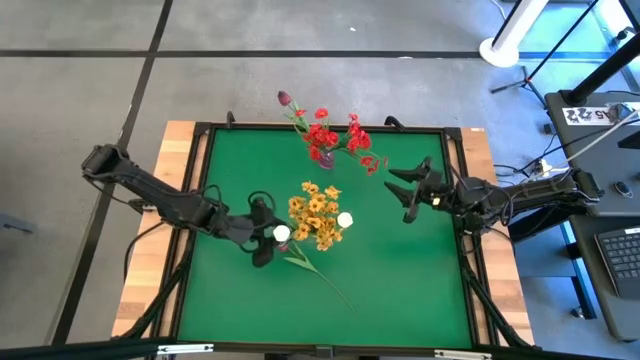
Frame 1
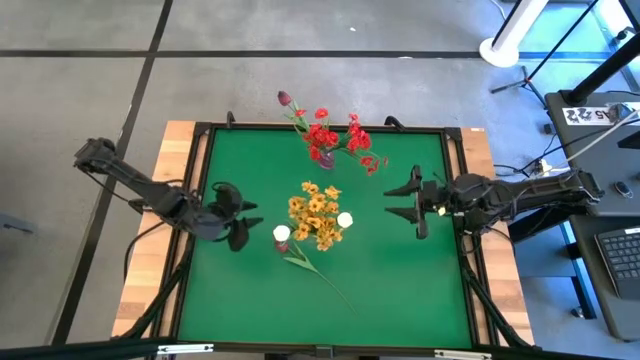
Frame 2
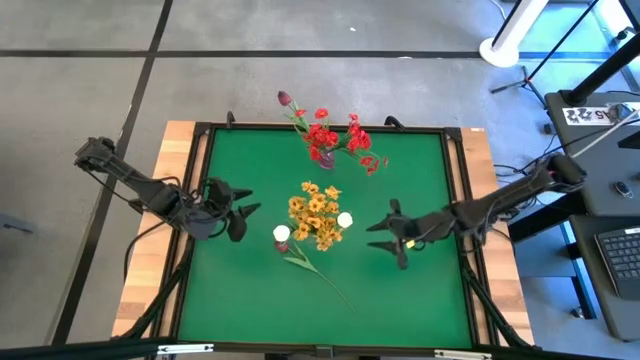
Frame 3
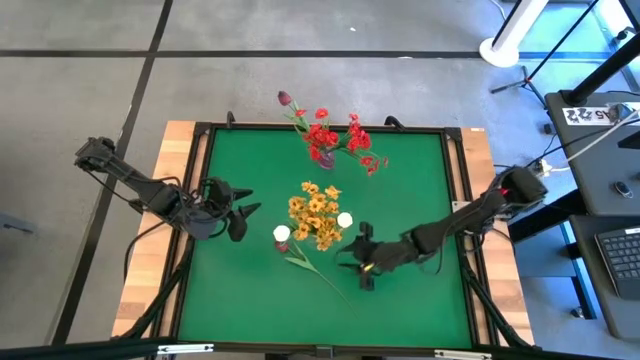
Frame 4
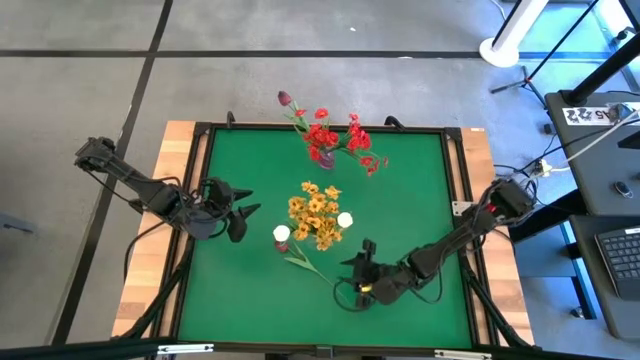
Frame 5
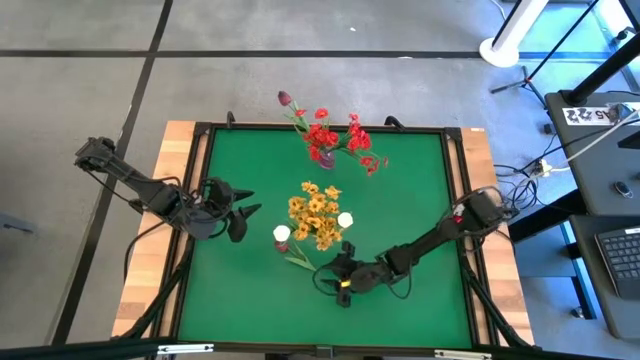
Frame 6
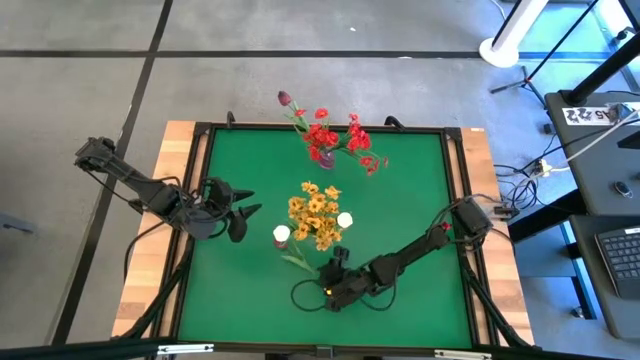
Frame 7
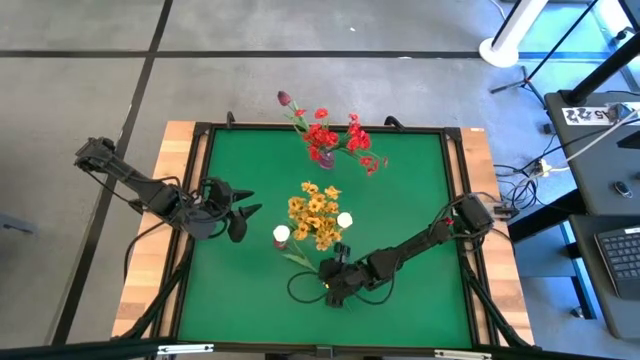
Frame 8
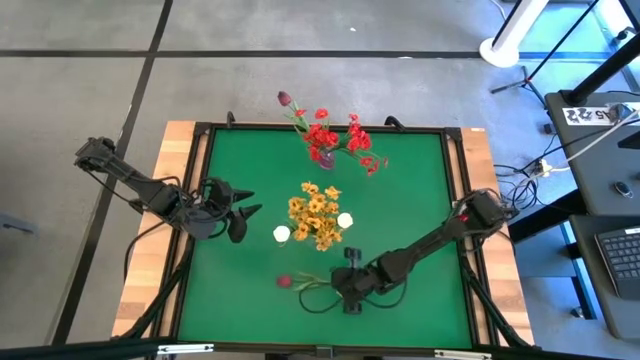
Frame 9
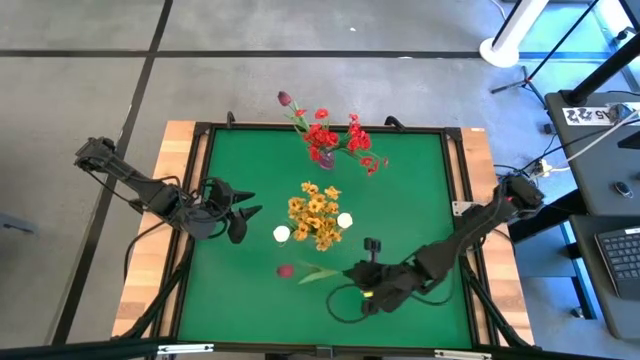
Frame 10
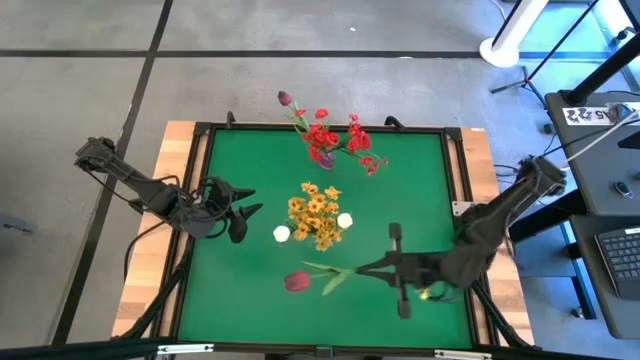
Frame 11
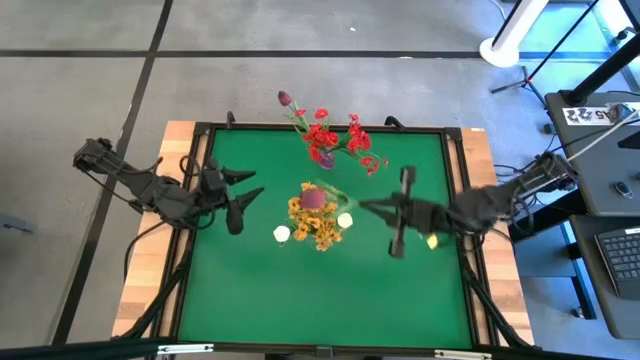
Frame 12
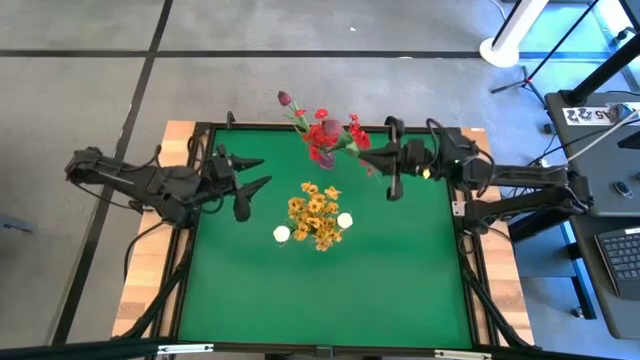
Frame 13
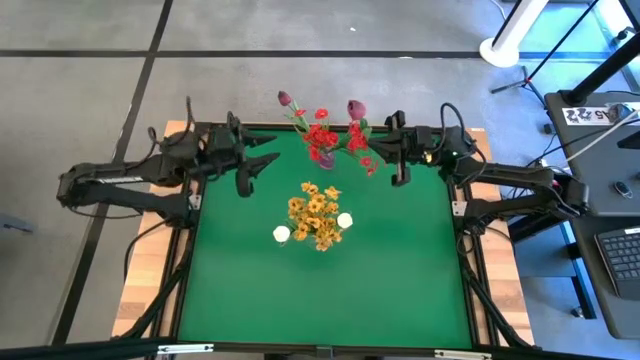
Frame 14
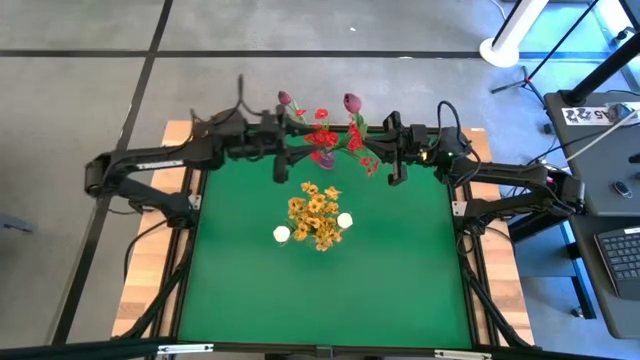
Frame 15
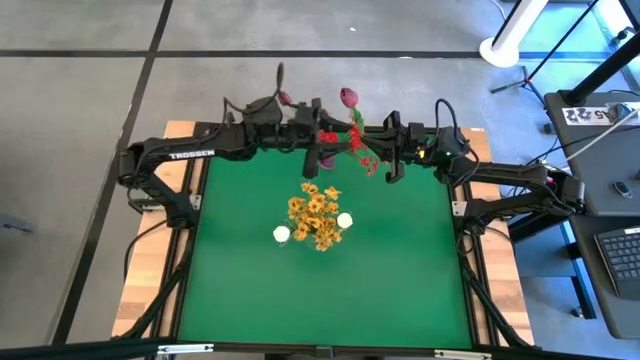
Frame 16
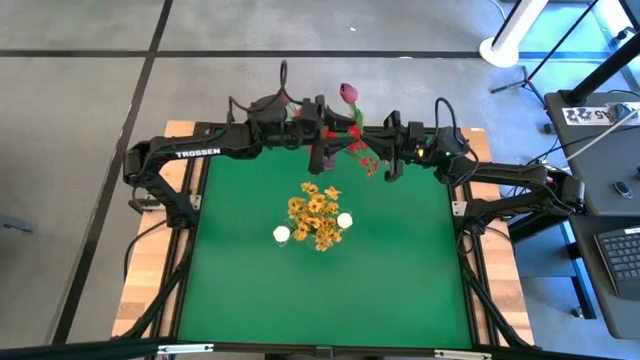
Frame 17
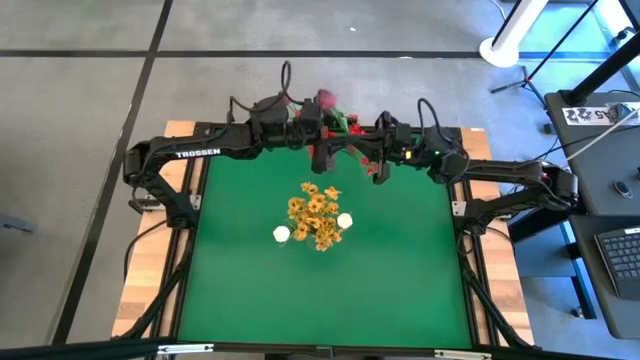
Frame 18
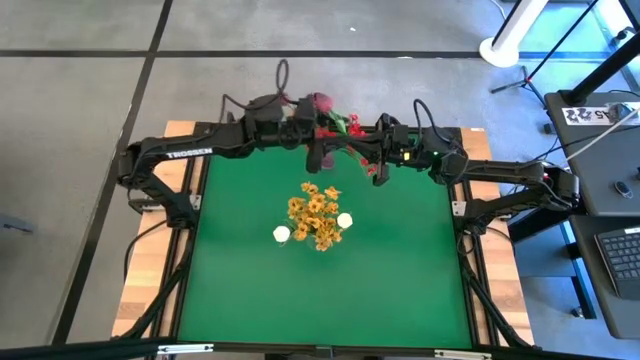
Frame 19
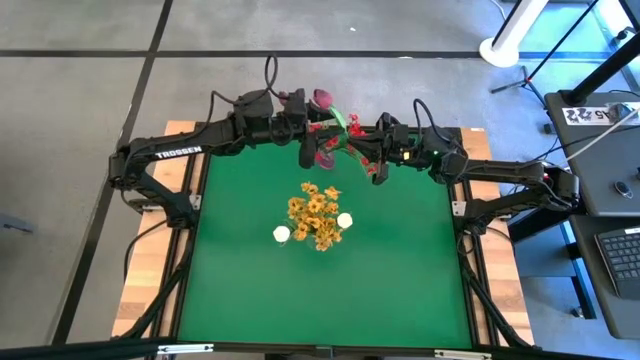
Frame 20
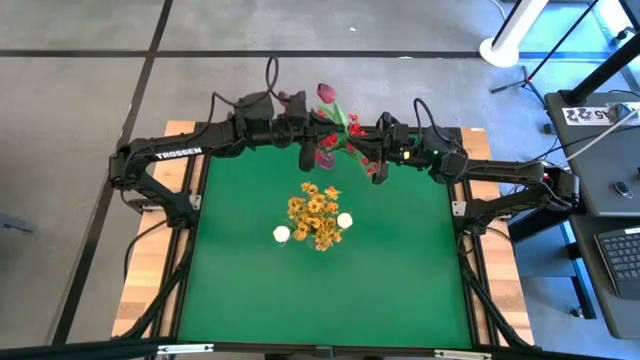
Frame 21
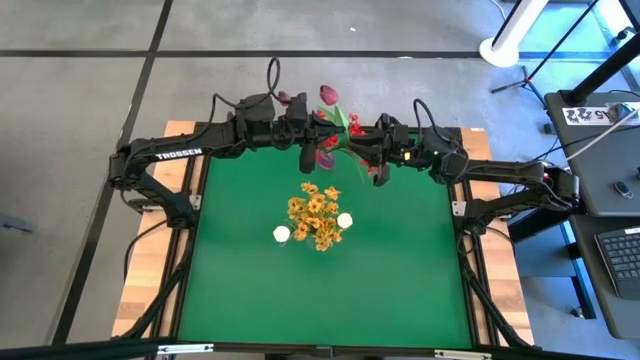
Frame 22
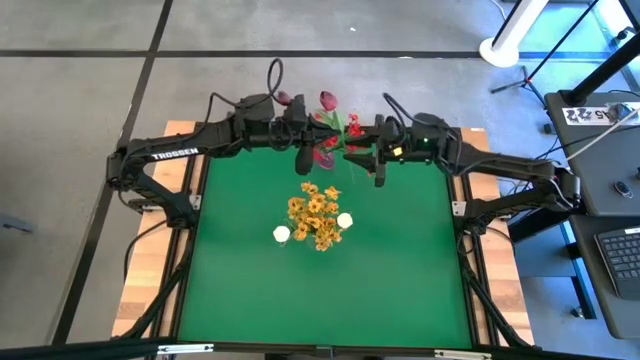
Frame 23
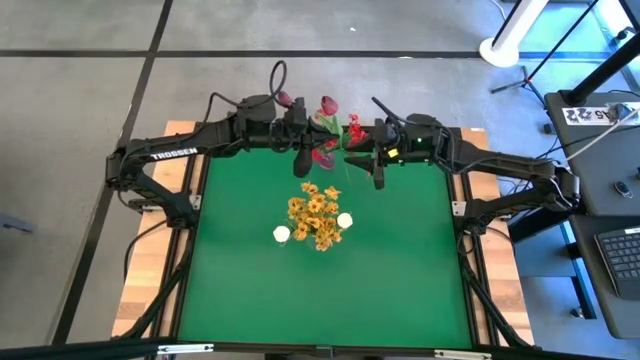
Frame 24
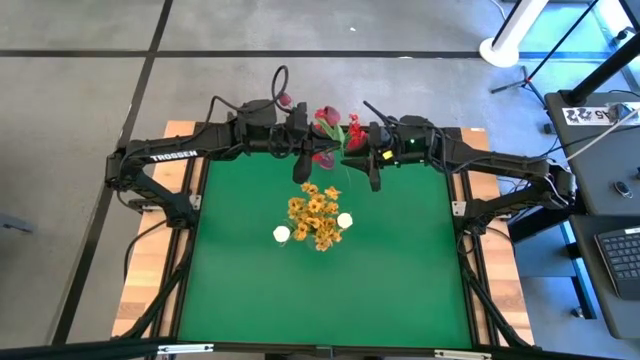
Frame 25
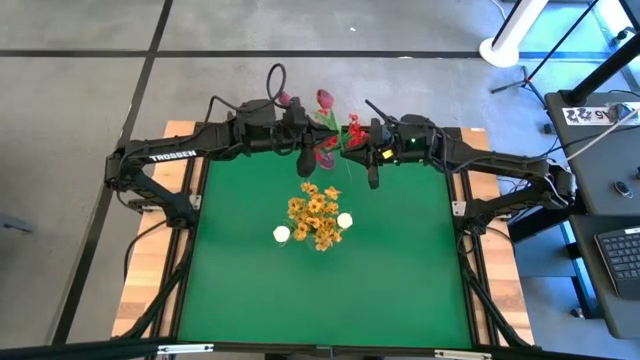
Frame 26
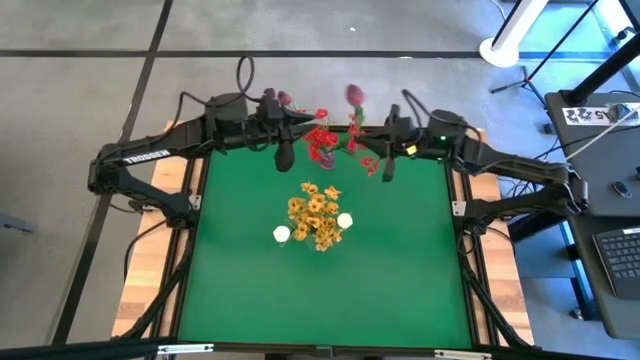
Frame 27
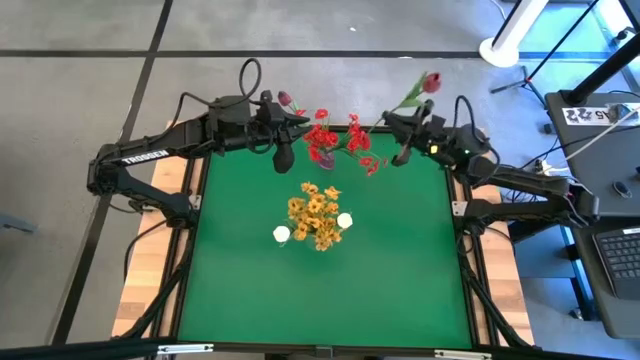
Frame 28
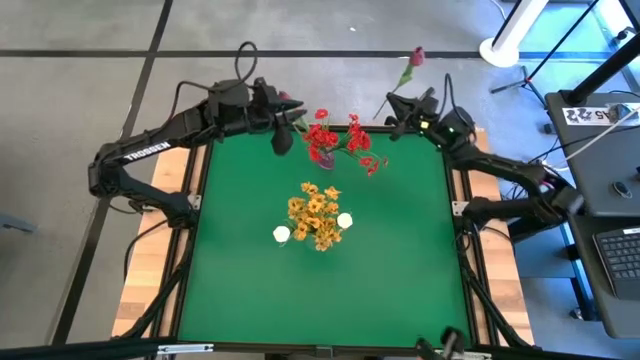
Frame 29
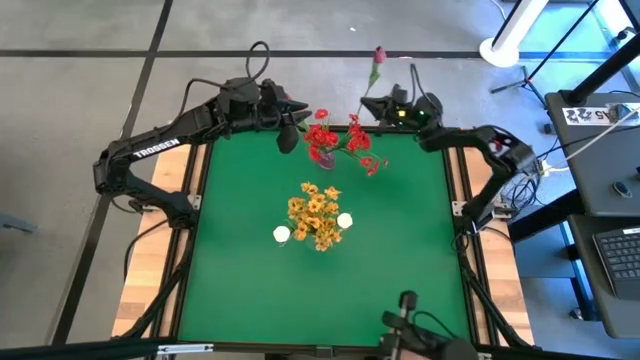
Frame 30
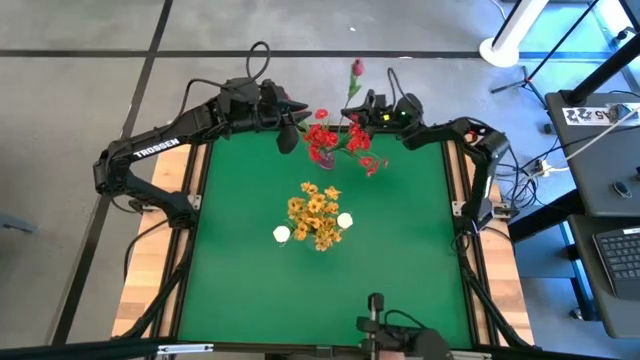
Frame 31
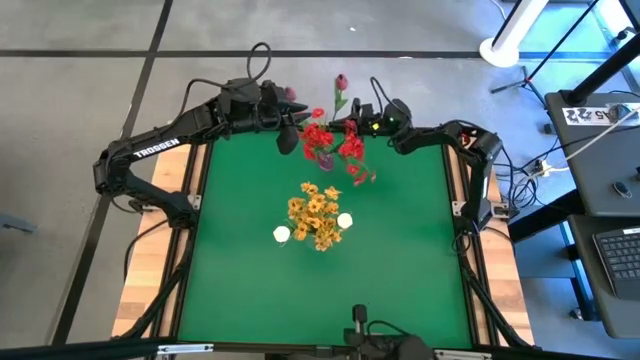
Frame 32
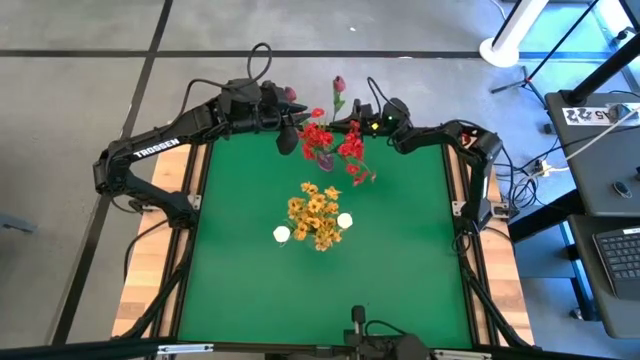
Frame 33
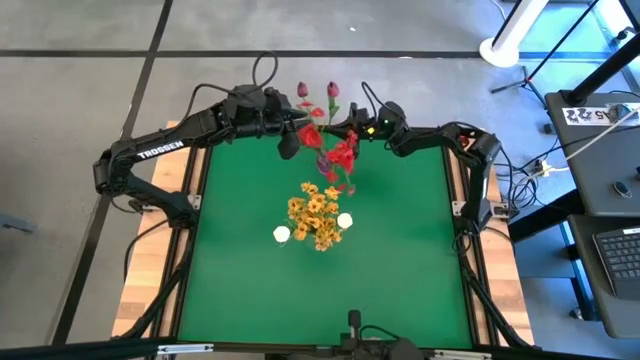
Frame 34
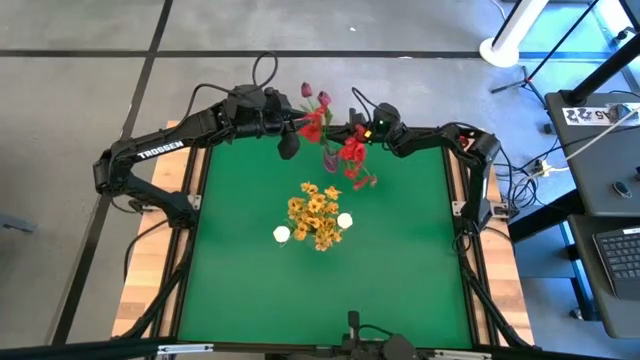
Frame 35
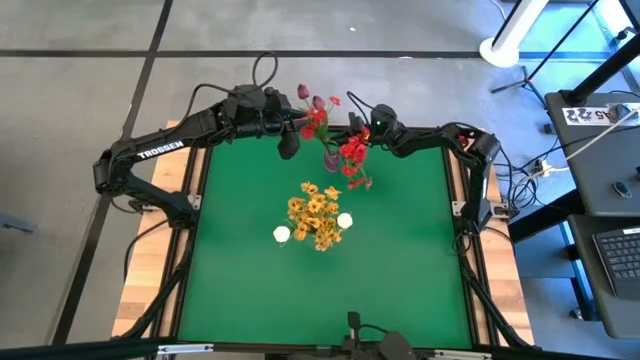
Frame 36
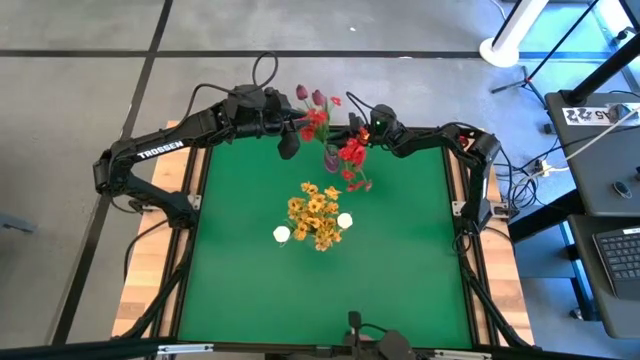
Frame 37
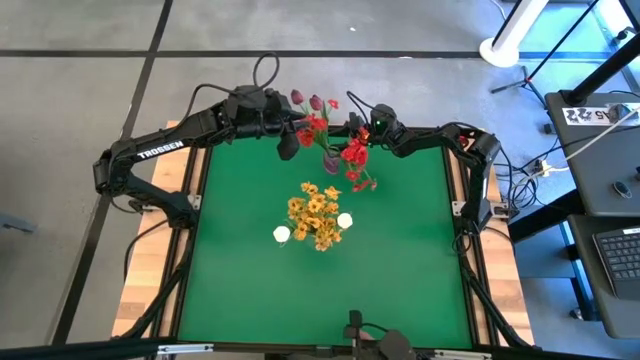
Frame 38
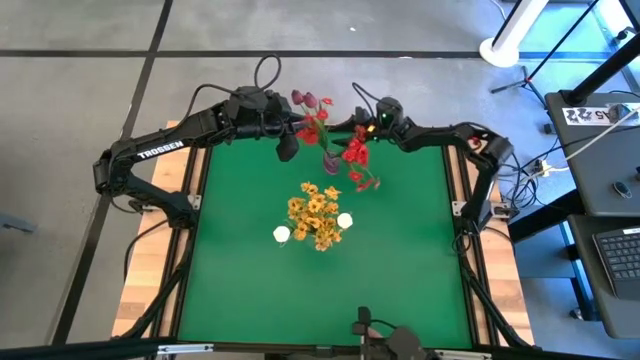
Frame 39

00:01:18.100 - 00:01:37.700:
Task: Sort flowers into vase by color
Put the red tulip into the purple vase

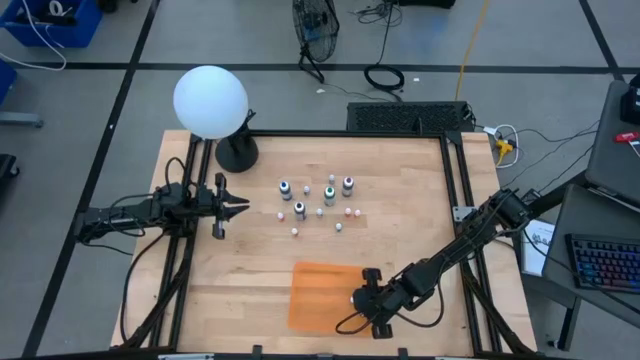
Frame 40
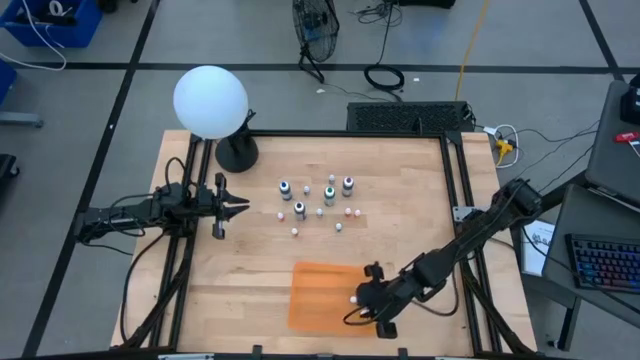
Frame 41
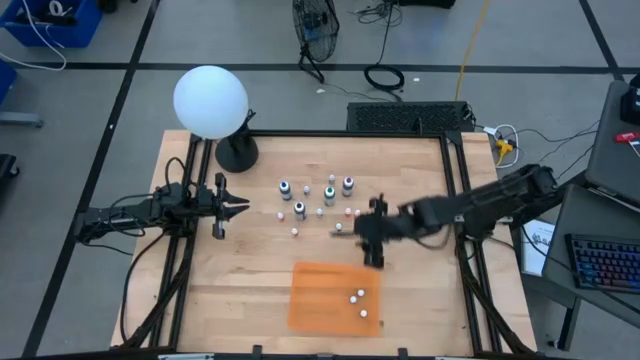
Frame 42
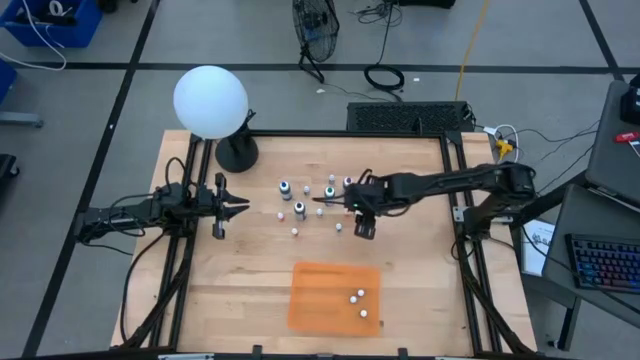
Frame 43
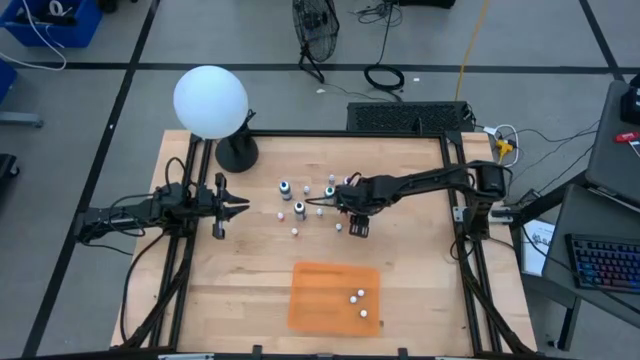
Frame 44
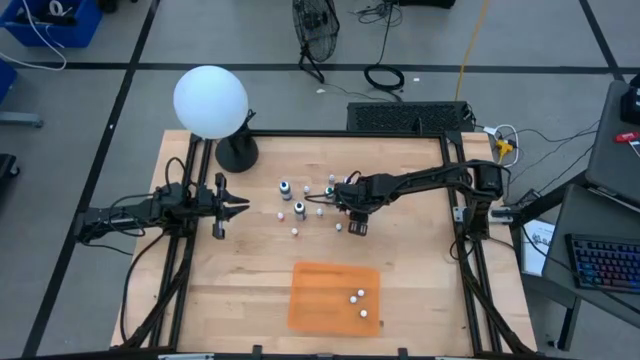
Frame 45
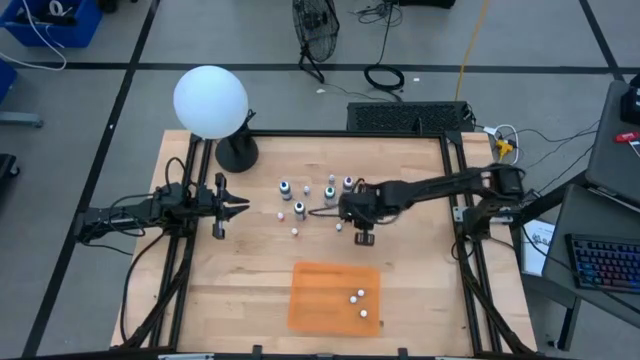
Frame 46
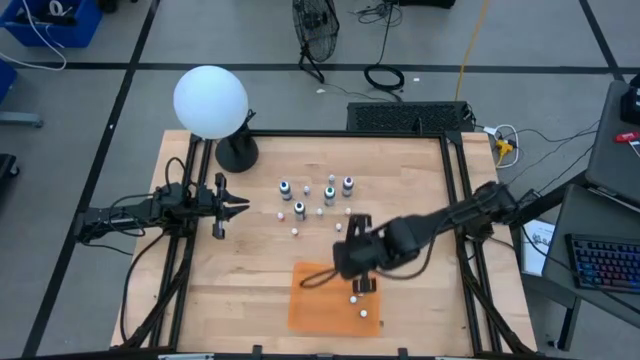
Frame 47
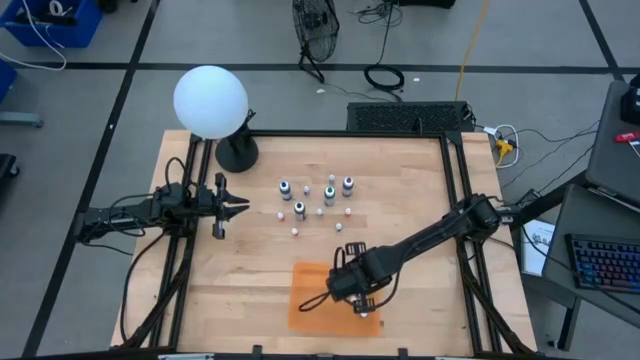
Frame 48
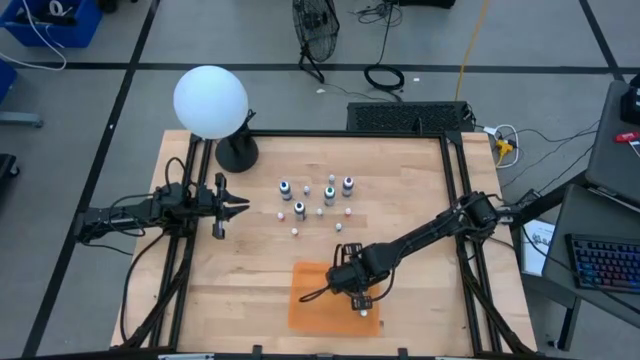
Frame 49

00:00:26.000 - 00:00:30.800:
Task: Pick & Place food coloring
Put the small orange food coloring bottle into the orange container
